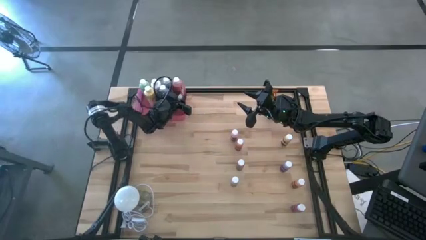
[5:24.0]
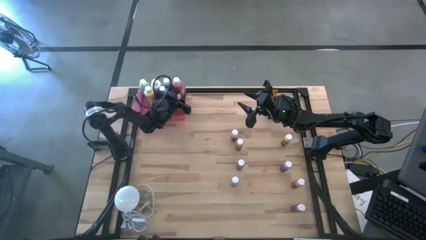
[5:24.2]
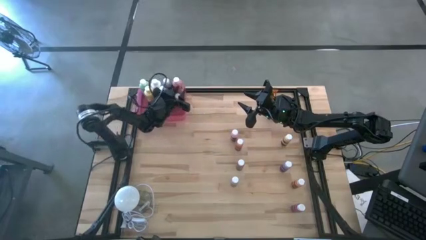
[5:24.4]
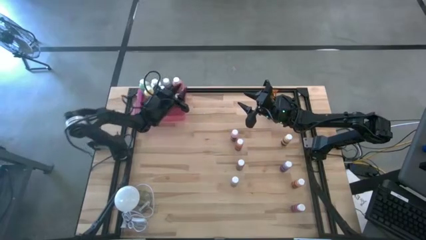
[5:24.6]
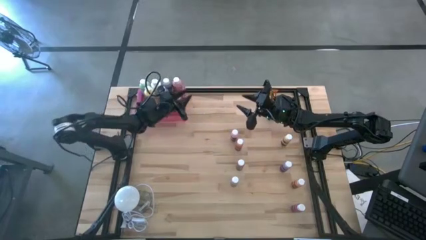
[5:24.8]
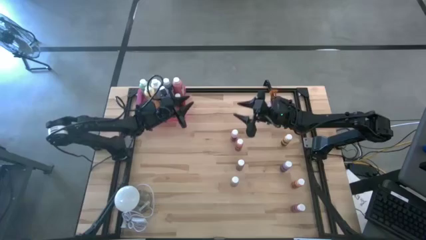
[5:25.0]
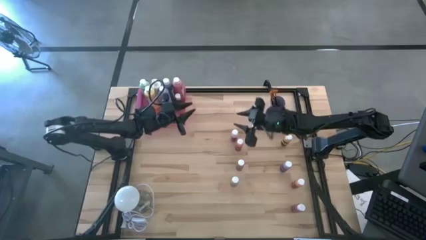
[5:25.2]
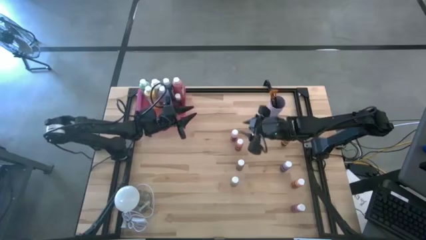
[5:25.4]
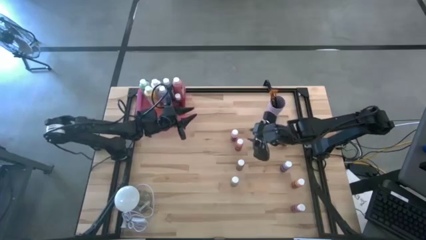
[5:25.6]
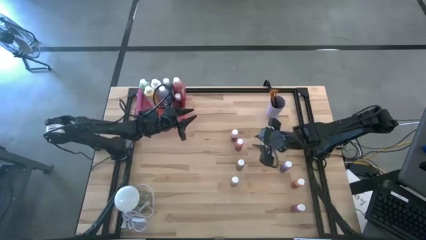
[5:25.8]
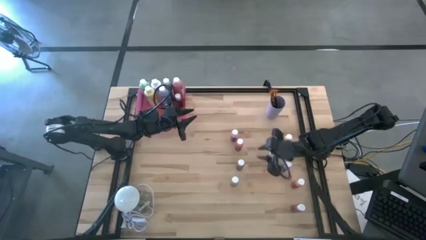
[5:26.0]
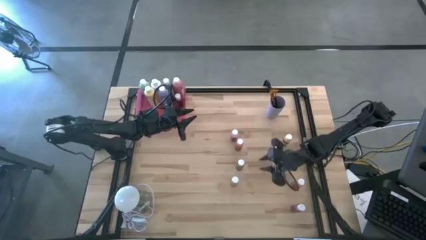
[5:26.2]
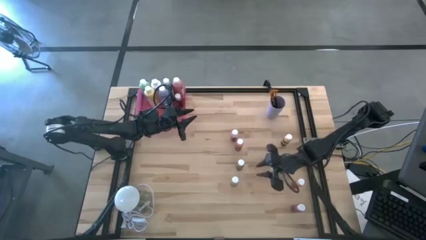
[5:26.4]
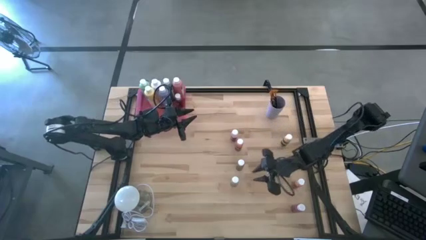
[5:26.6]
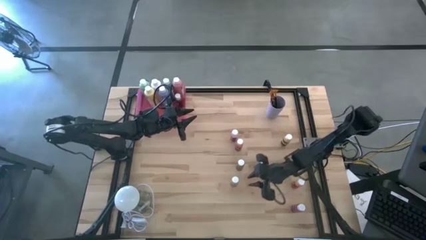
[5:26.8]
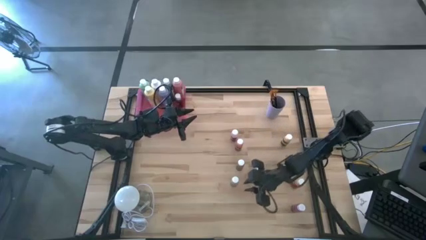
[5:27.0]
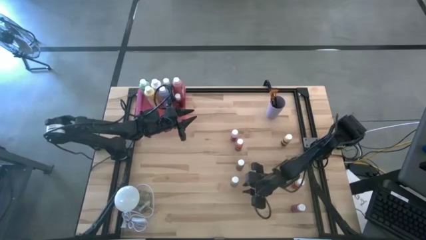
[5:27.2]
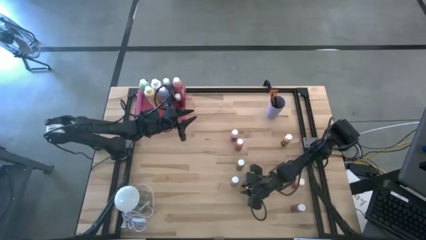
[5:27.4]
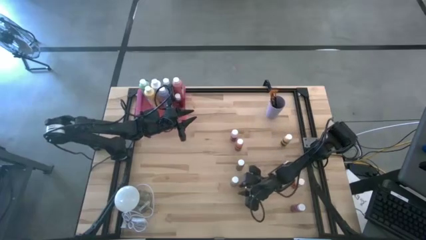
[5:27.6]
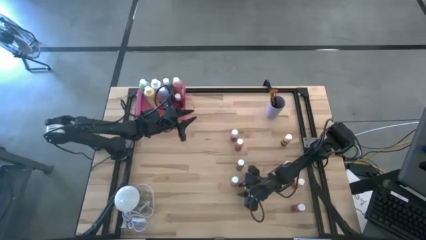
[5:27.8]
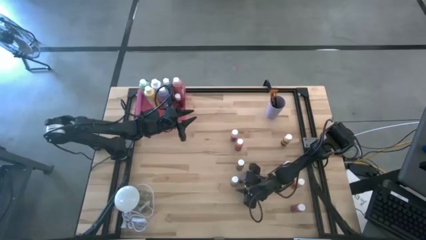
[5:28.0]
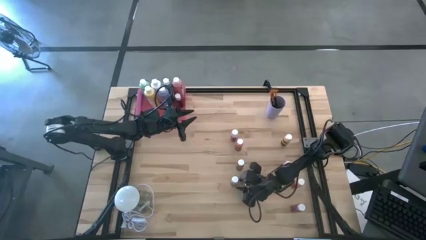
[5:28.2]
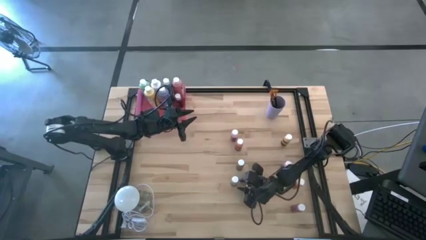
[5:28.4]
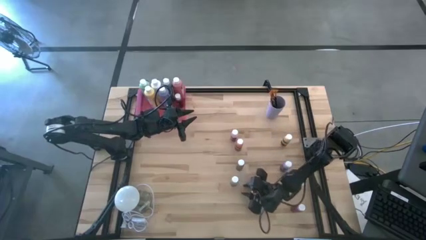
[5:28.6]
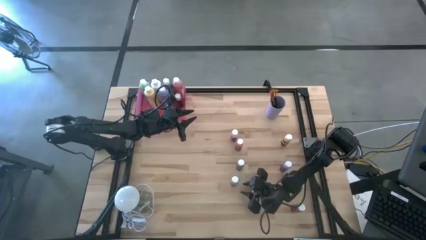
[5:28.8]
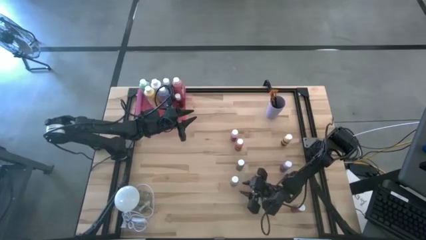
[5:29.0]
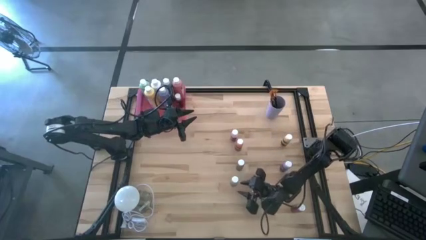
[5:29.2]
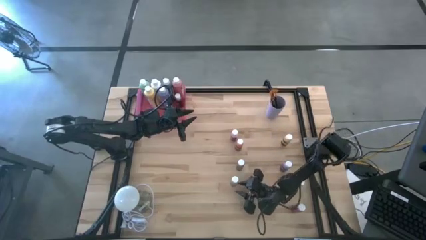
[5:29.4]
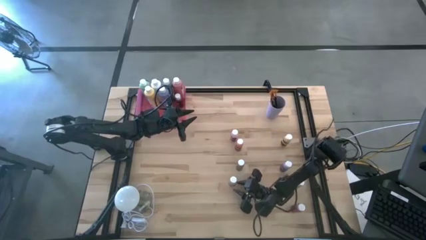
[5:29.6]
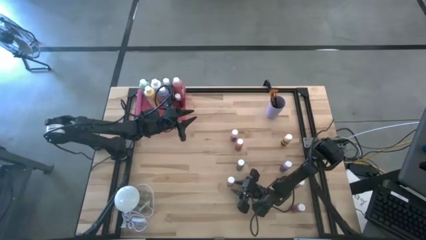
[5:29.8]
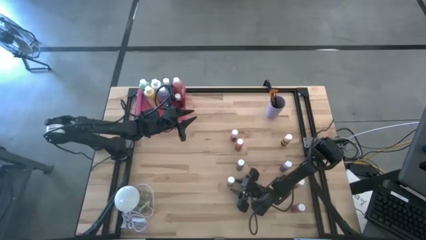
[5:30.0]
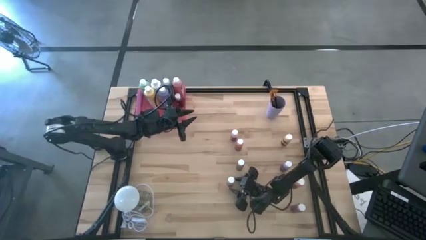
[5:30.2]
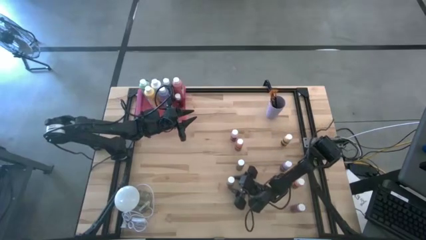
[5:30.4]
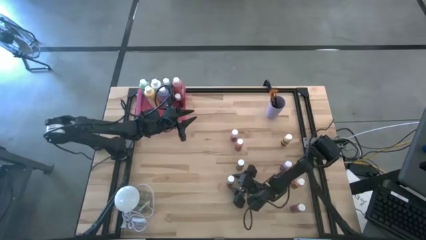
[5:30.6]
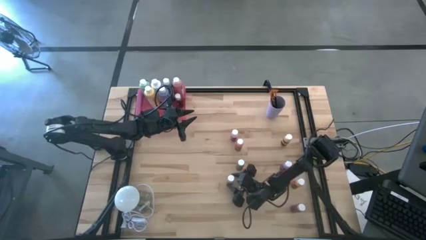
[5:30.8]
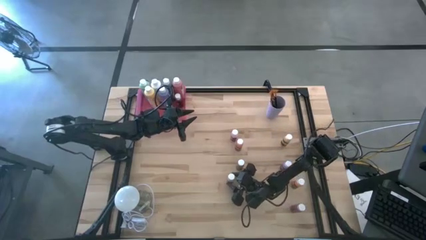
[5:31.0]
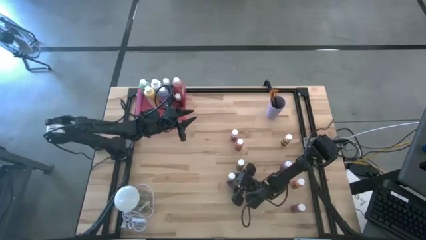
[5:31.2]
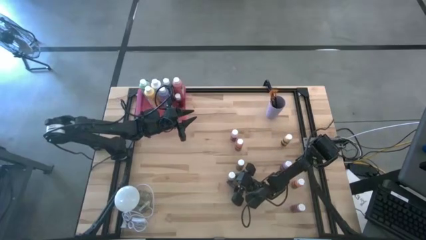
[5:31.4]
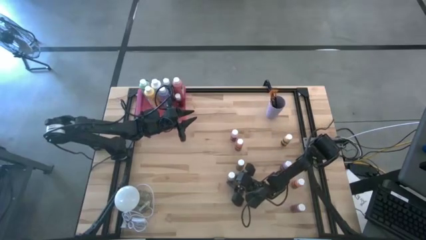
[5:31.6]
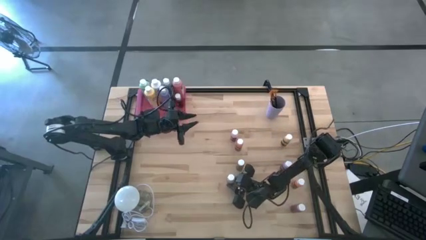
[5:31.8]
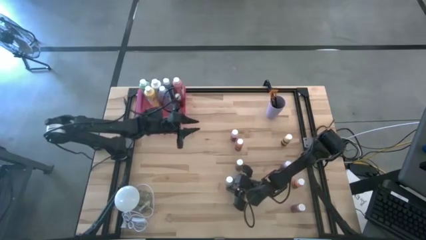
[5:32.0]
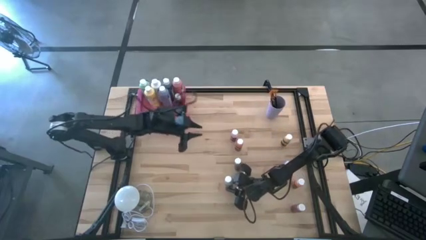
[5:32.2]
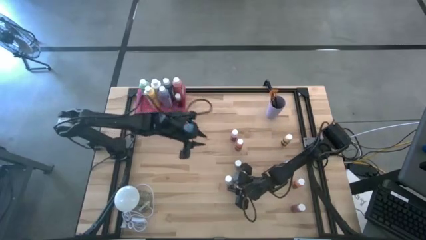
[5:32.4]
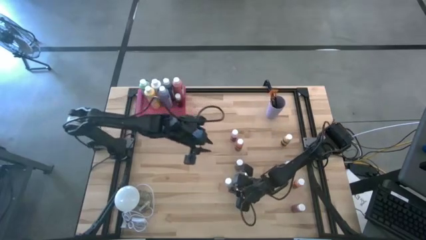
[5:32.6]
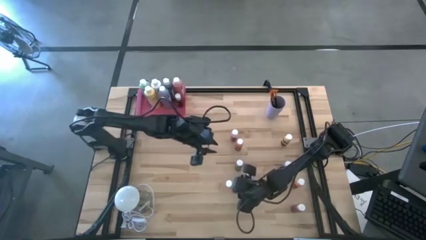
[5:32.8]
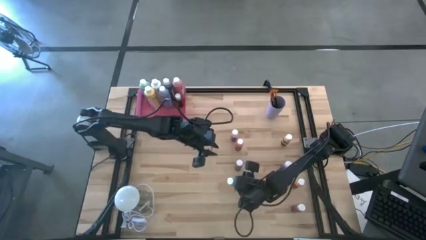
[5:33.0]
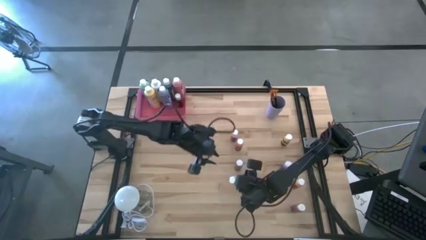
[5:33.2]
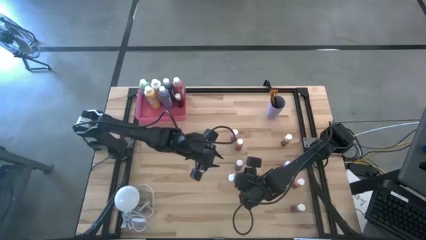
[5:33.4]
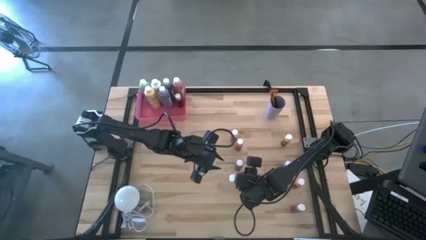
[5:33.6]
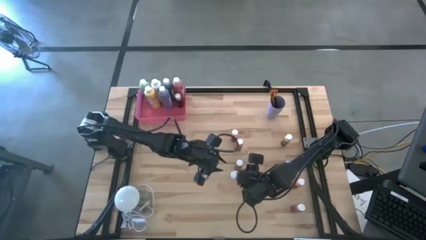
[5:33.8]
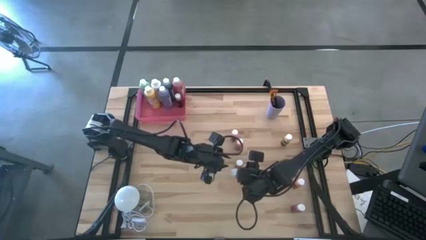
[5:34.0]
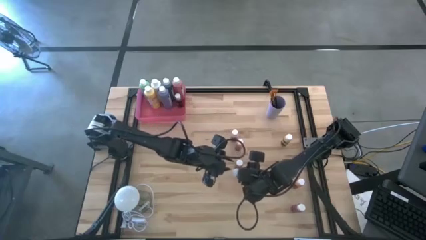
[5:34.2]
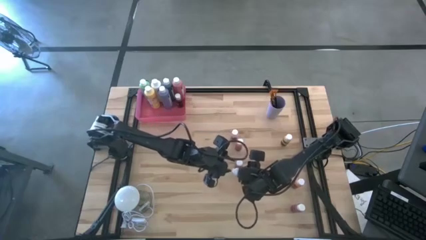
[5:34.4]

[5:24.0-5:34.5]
Task: Pick & Place Paint Supplies
Put the small white paint bottle into the pink bin
